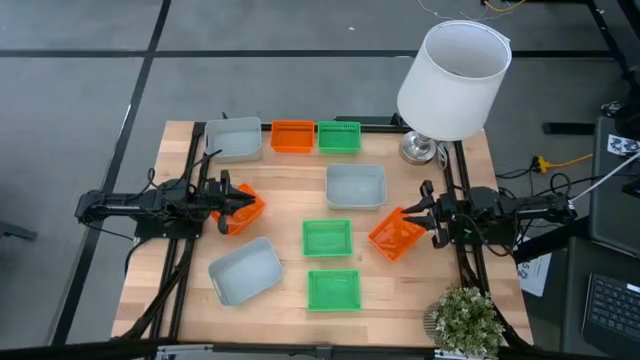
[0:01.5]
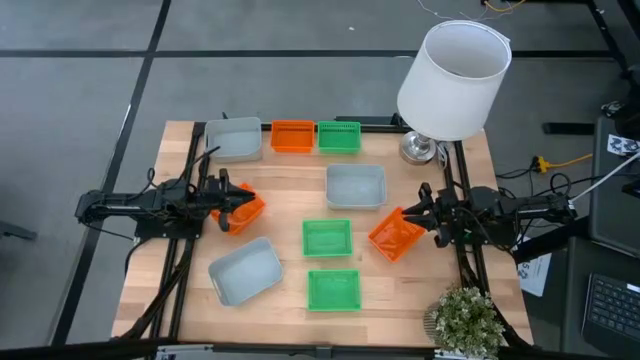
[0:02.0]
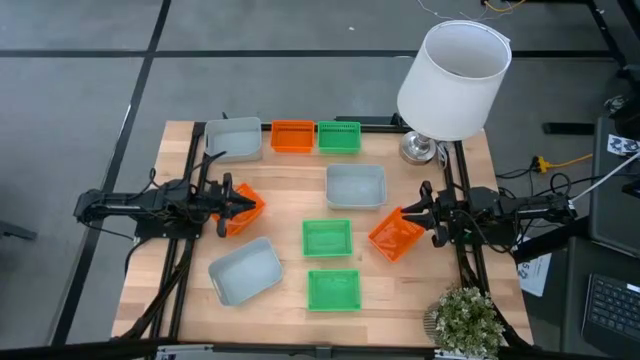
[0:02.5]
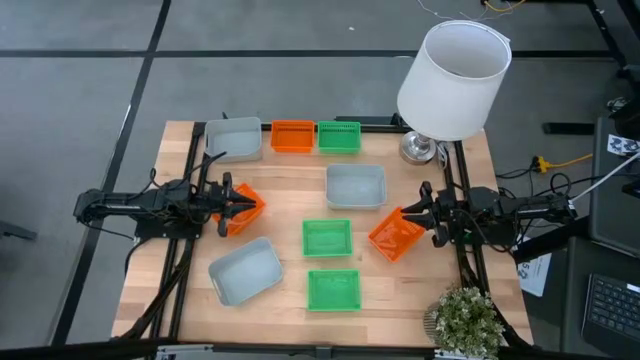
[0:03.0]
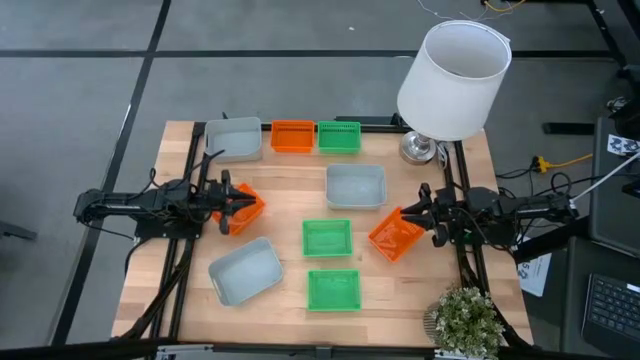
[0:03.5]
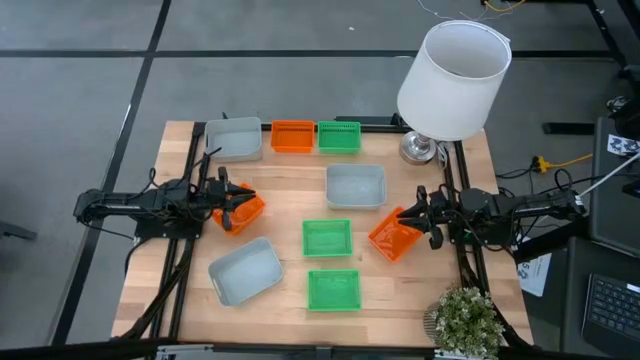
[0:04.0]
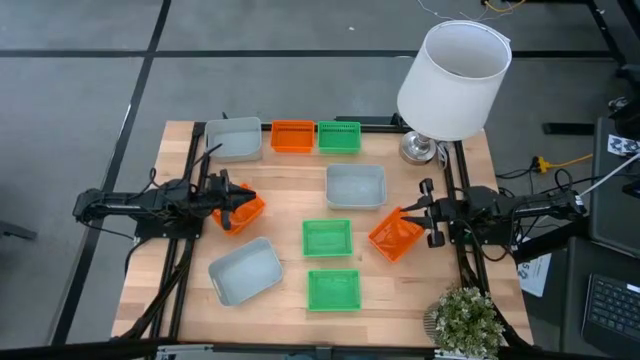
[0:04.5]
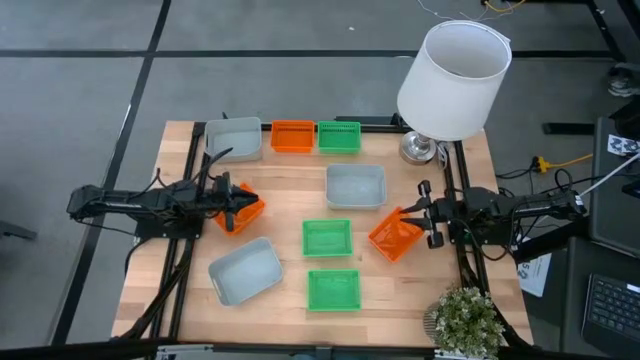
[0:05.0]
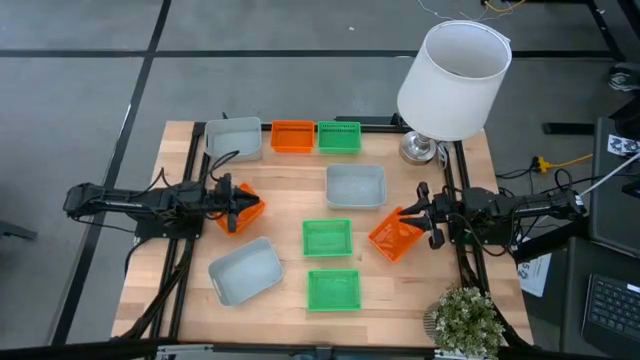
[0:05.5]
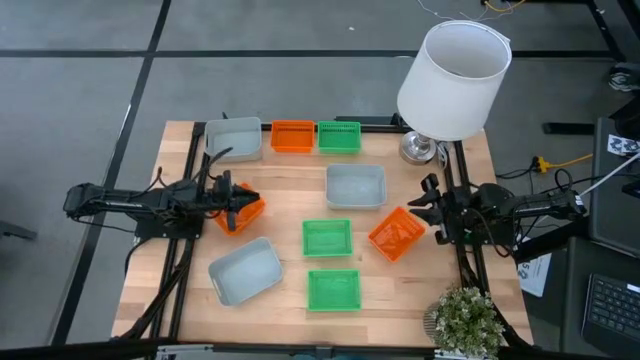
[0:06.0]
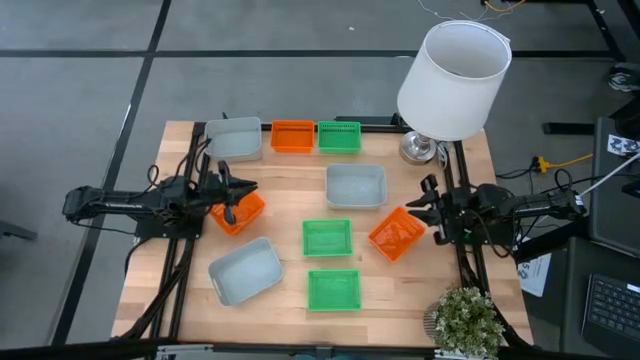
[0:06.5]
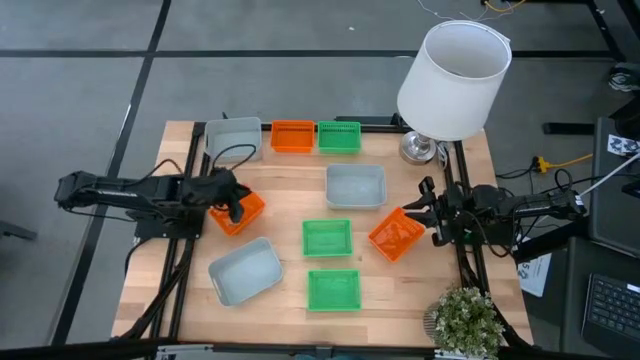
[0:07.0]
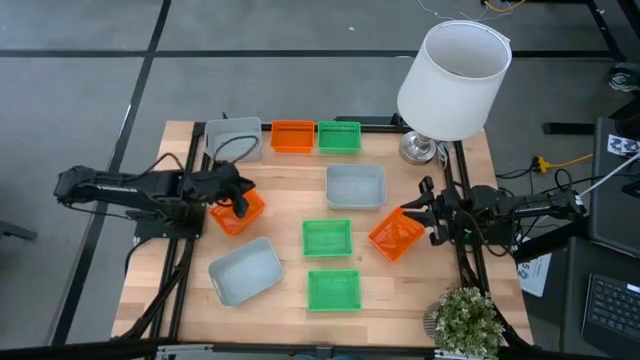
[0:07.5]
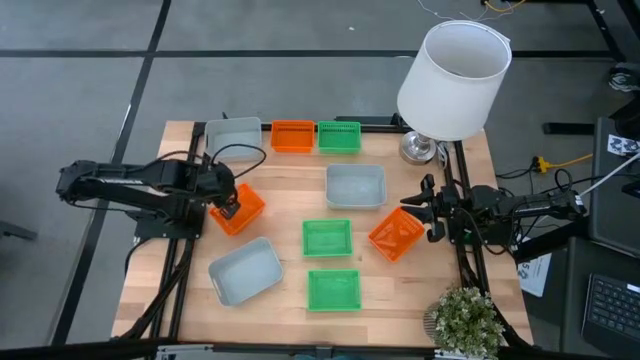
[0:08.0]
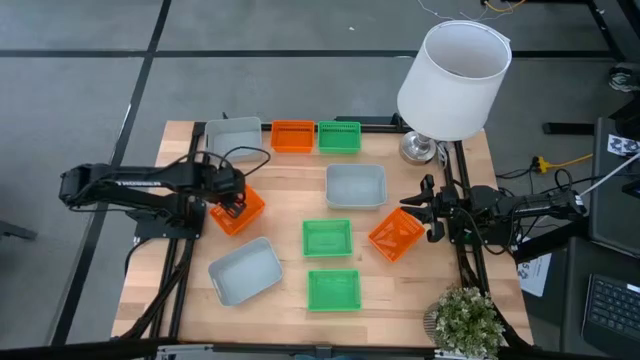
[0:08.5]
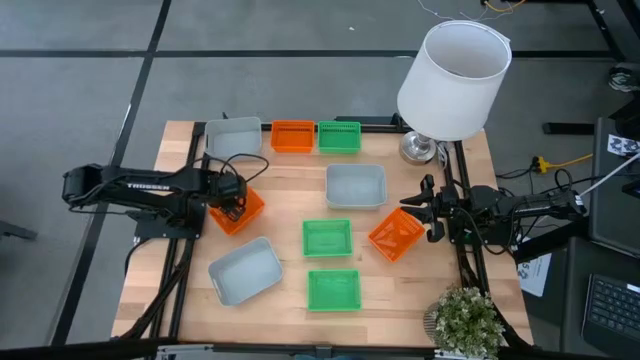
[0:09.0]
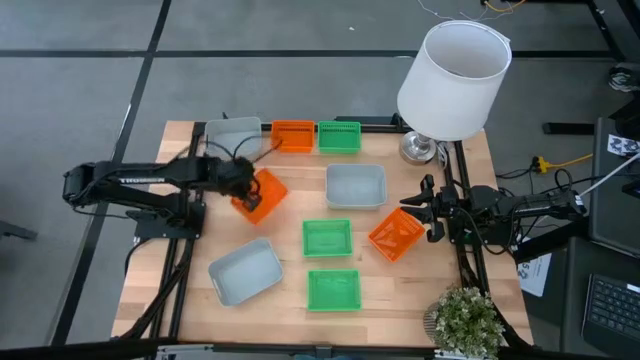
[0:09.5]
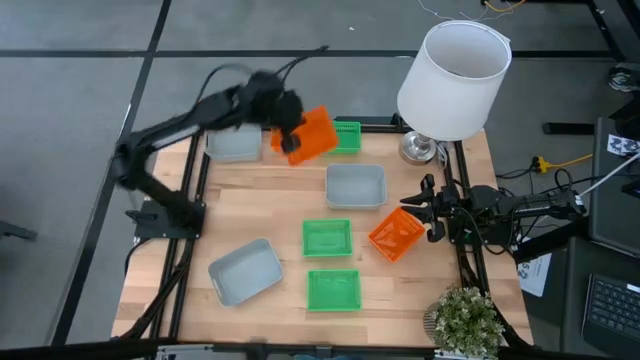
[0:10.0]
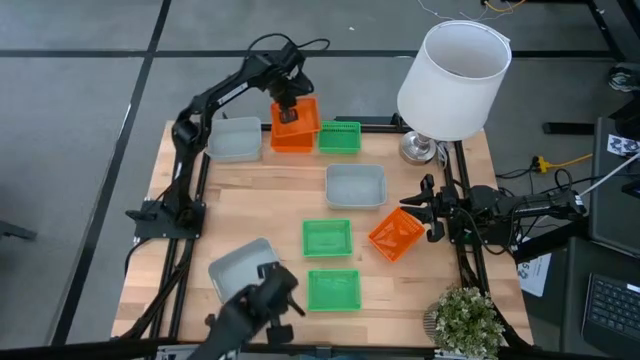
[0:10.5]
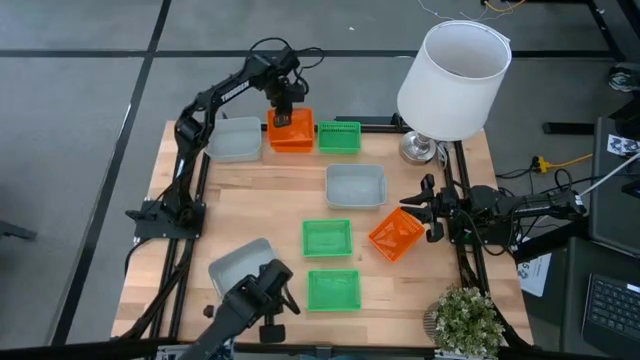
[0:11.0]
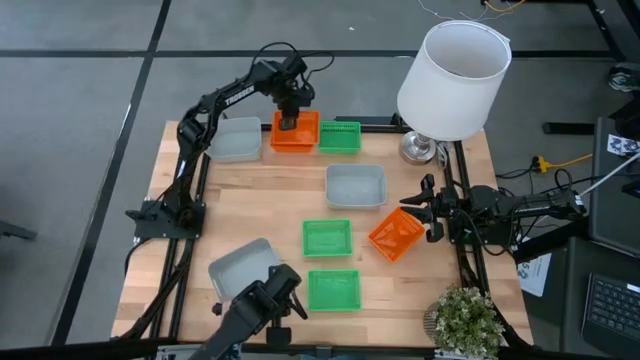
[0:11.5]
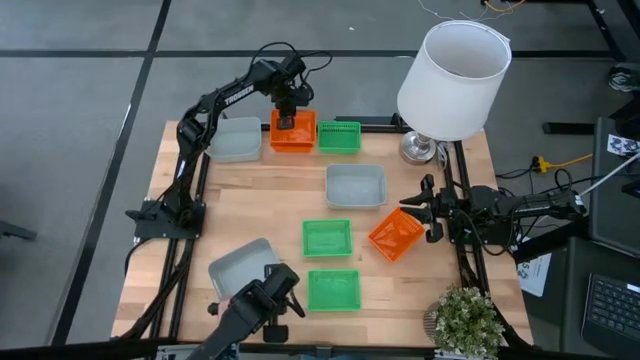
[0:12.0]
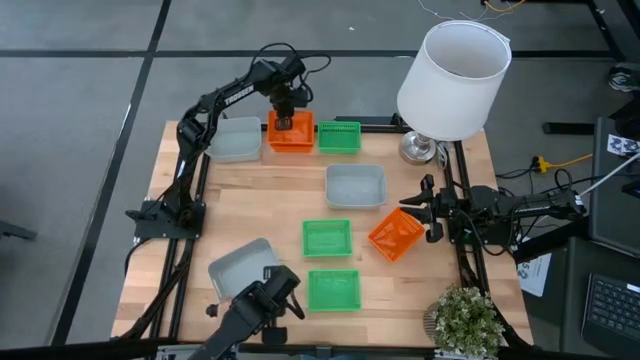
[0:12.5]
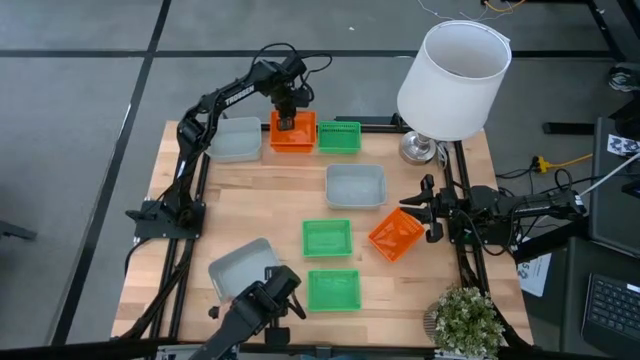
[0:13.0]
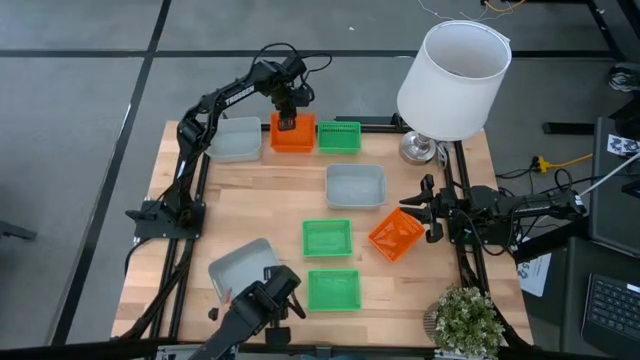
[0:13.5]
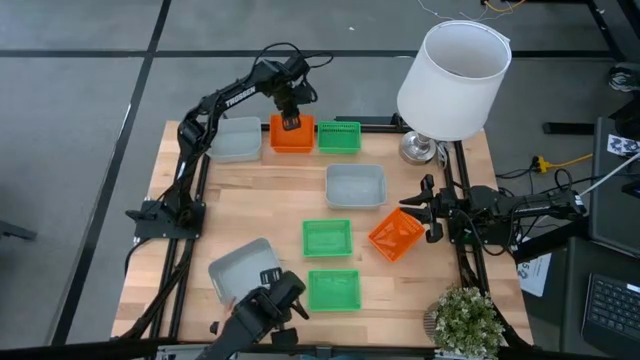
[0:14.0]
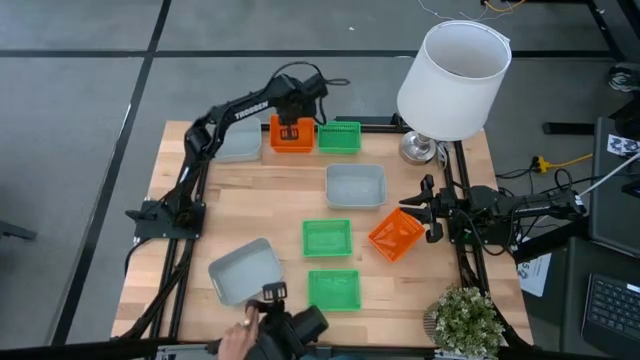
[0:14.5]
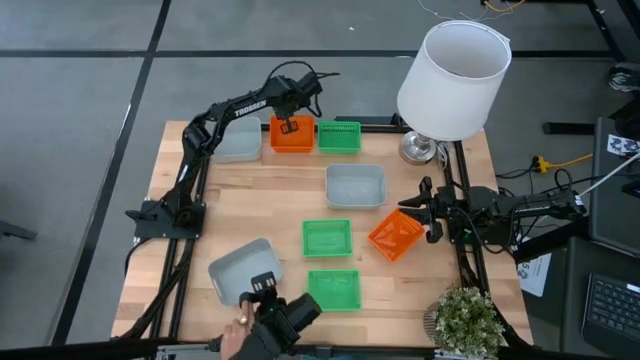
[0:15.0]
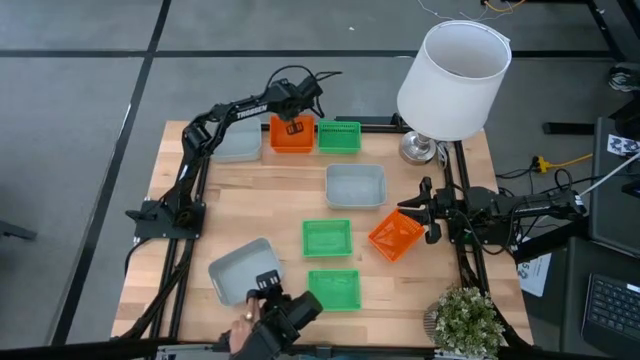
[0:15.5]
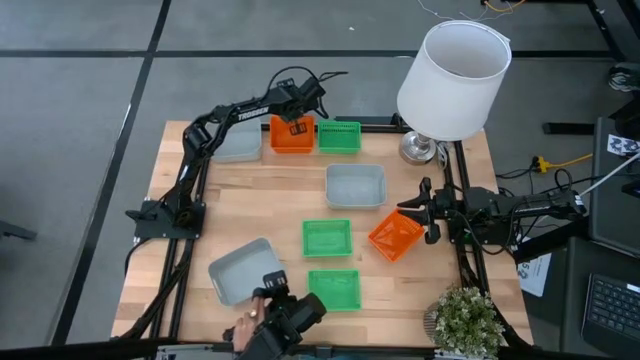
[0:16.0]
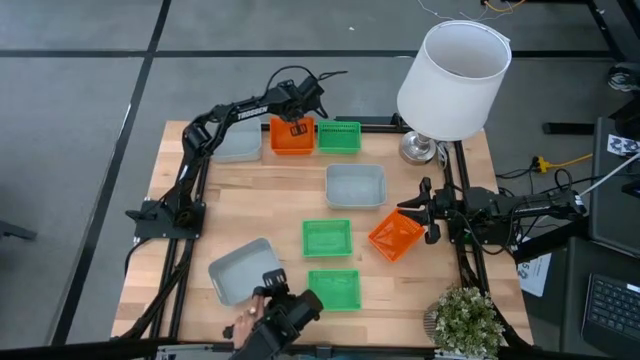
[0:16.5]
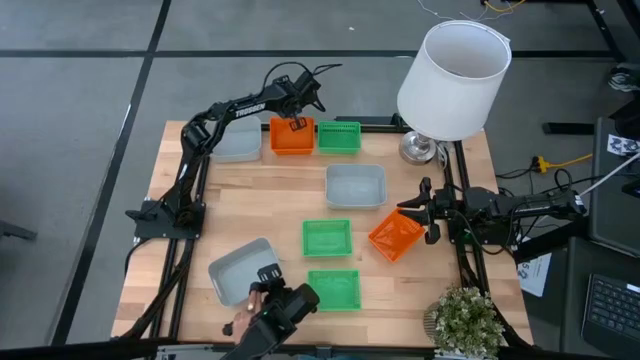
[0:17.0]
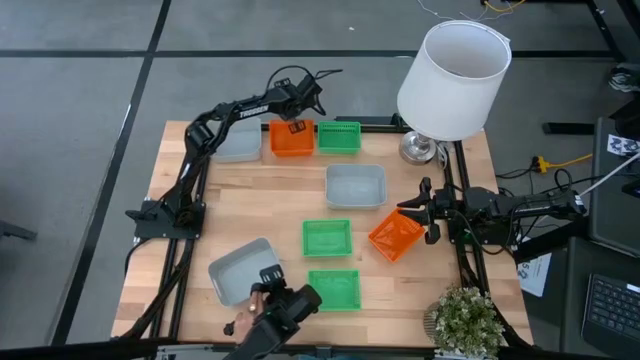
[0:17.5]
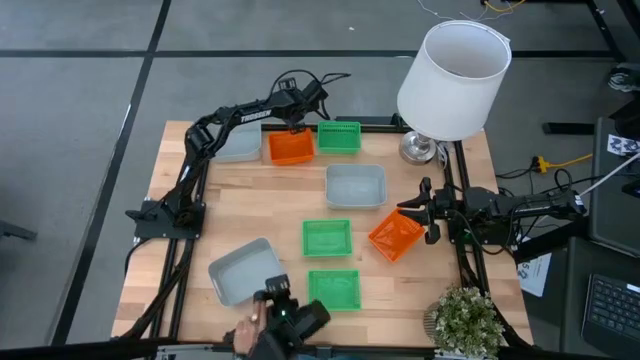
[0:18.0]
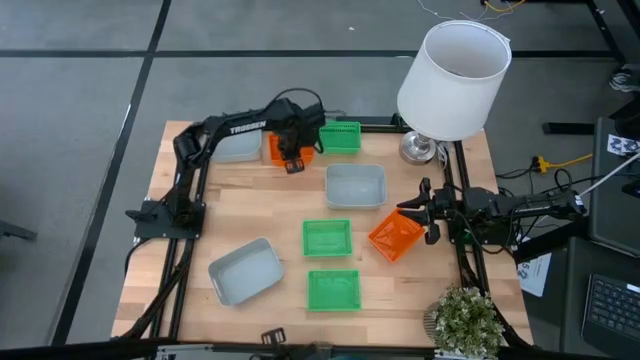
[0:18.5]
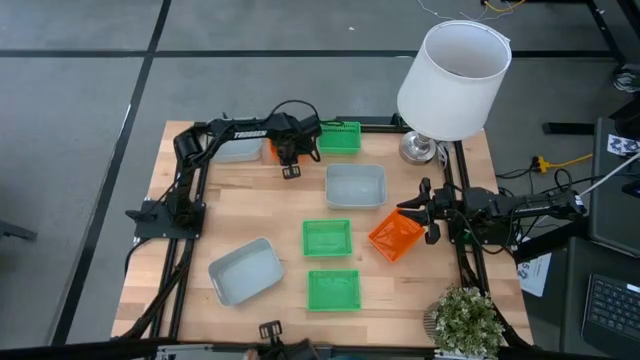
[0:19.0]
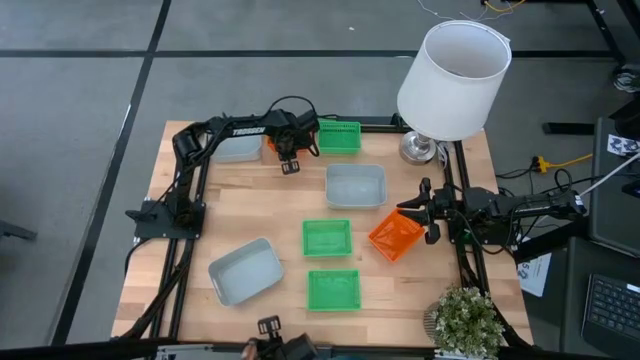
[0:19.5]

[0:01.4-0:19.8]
Stack the bottom left orange bin on the top orange bin
